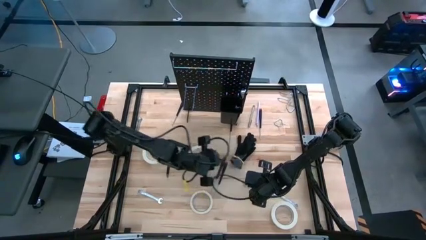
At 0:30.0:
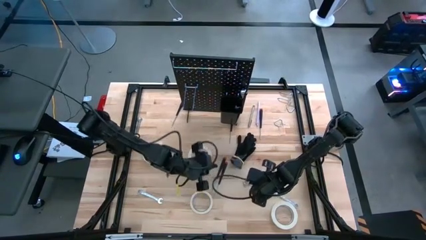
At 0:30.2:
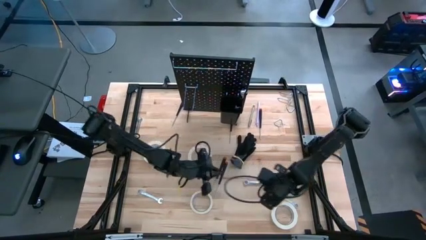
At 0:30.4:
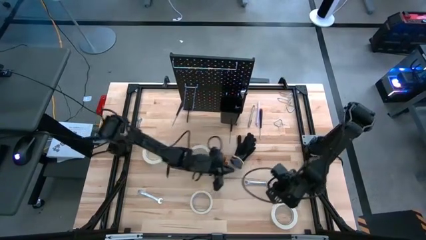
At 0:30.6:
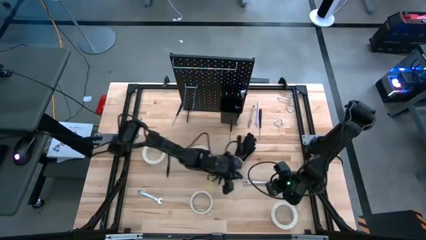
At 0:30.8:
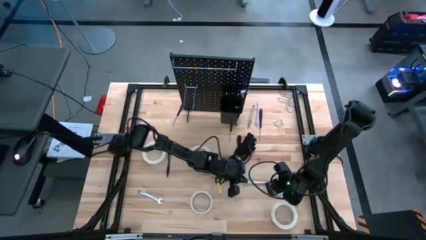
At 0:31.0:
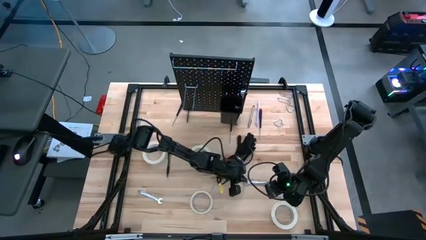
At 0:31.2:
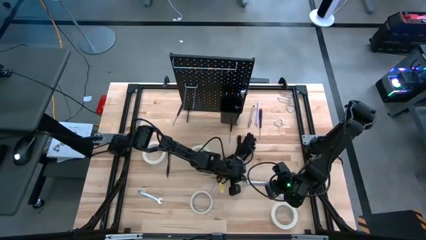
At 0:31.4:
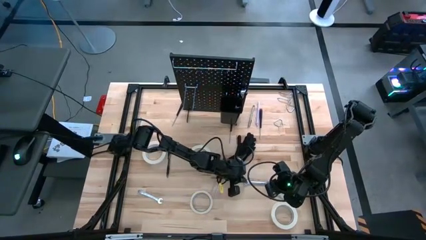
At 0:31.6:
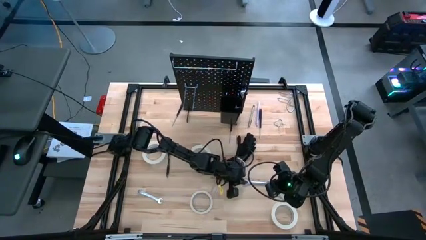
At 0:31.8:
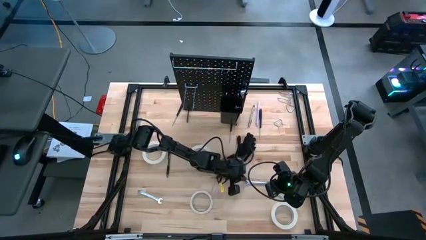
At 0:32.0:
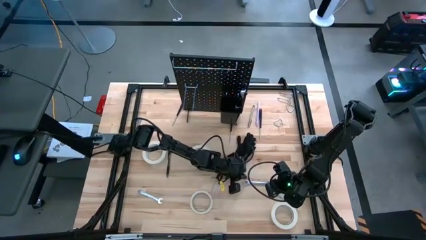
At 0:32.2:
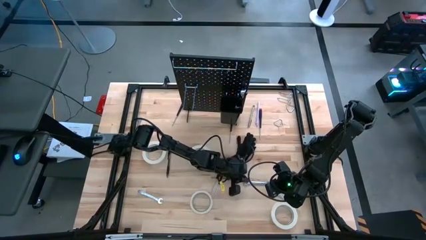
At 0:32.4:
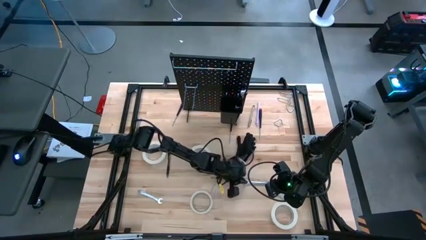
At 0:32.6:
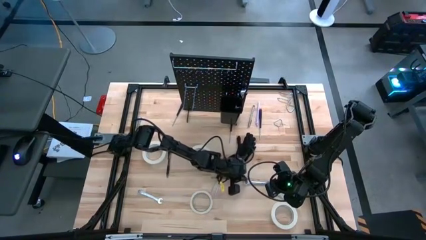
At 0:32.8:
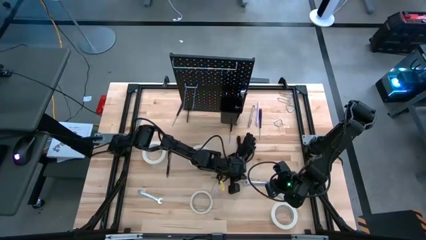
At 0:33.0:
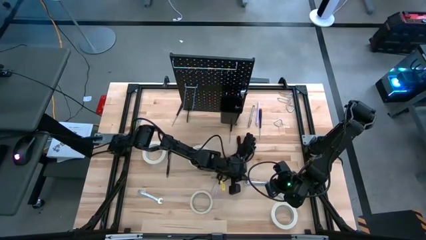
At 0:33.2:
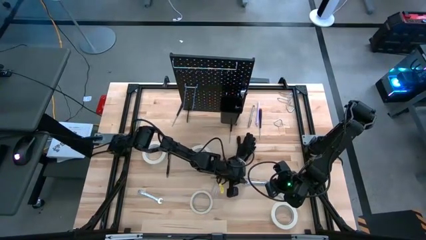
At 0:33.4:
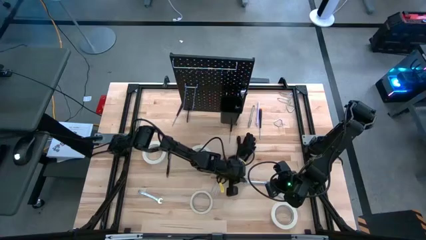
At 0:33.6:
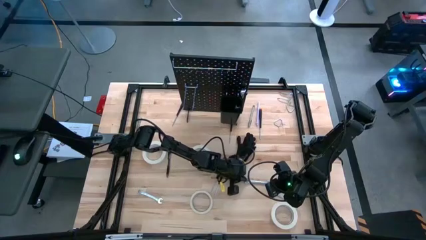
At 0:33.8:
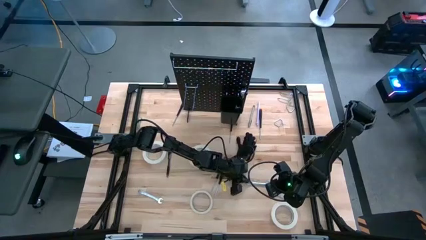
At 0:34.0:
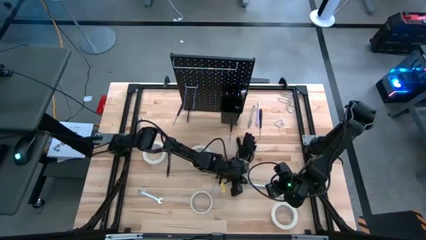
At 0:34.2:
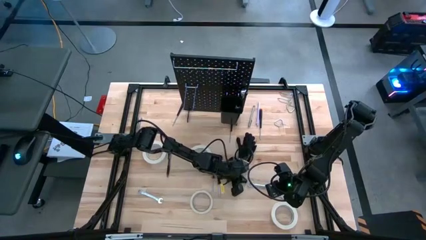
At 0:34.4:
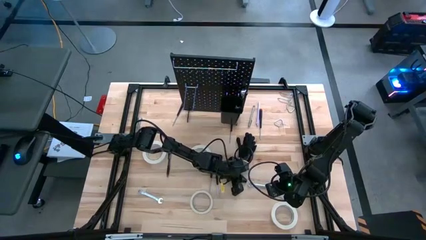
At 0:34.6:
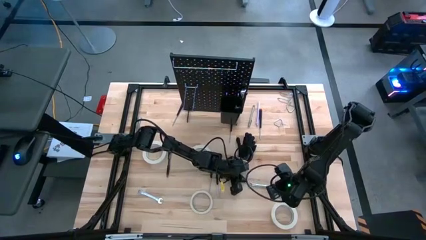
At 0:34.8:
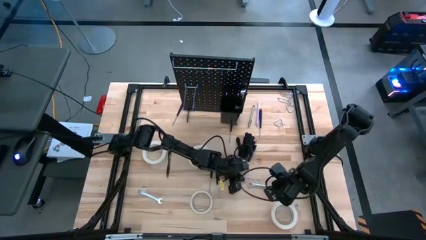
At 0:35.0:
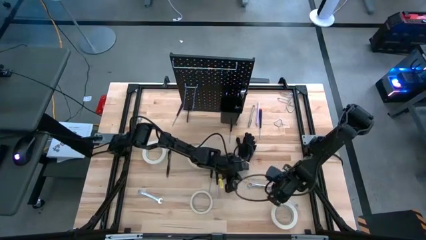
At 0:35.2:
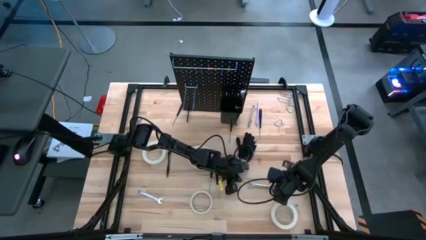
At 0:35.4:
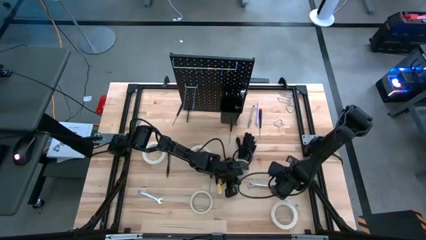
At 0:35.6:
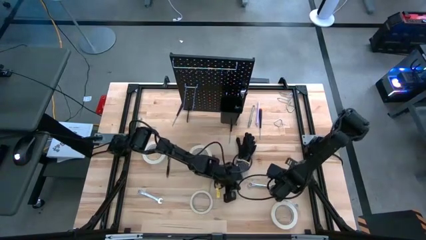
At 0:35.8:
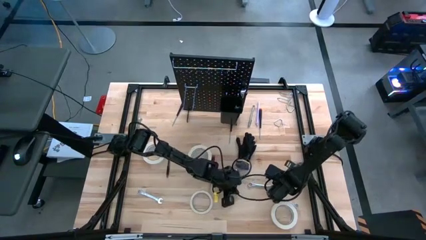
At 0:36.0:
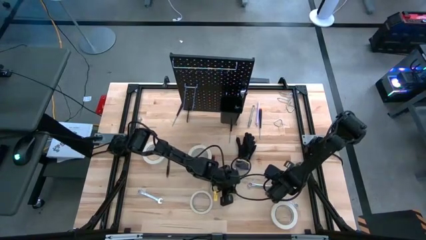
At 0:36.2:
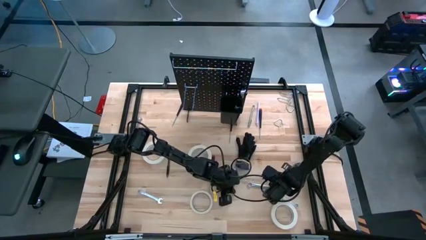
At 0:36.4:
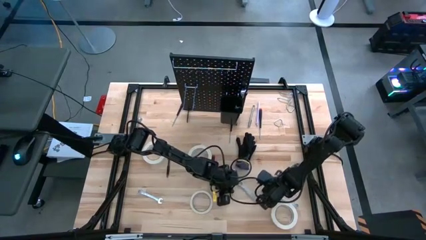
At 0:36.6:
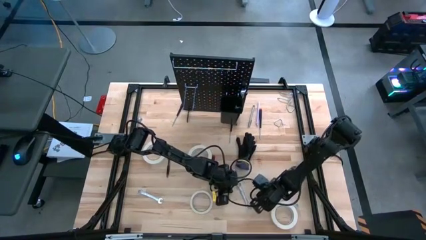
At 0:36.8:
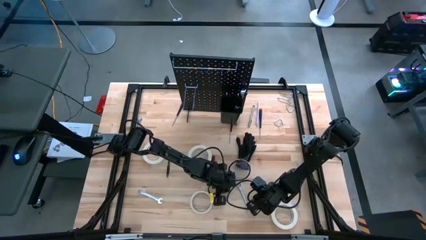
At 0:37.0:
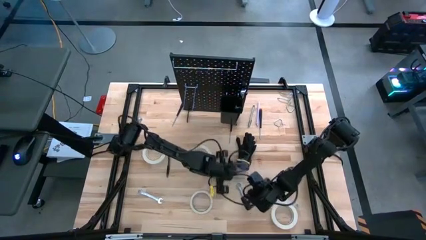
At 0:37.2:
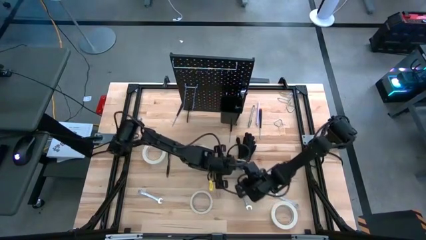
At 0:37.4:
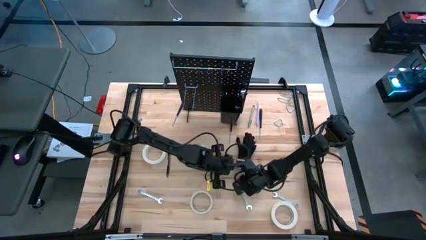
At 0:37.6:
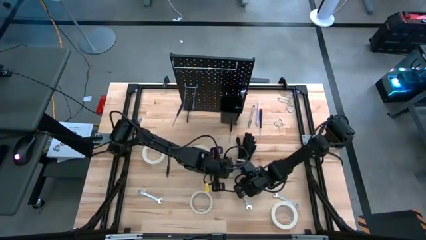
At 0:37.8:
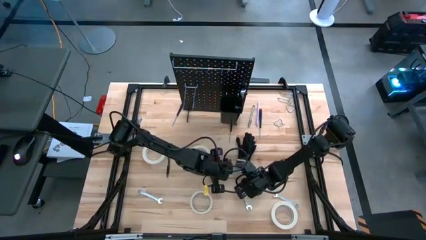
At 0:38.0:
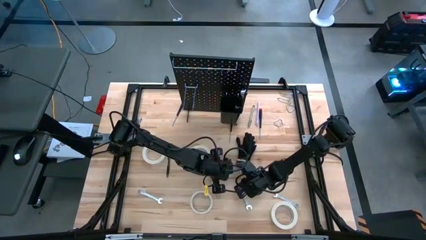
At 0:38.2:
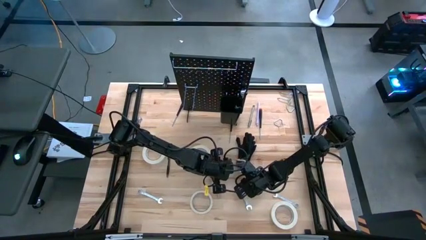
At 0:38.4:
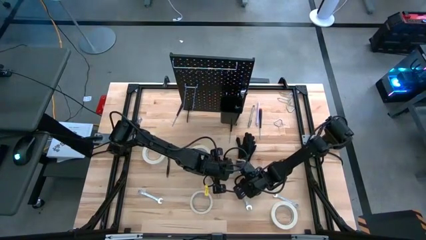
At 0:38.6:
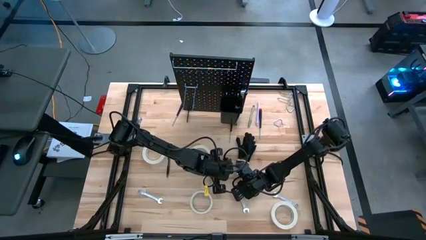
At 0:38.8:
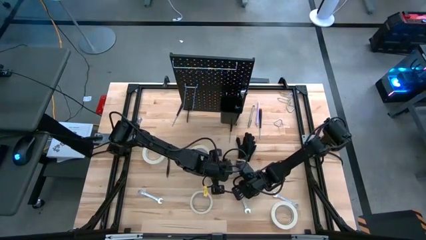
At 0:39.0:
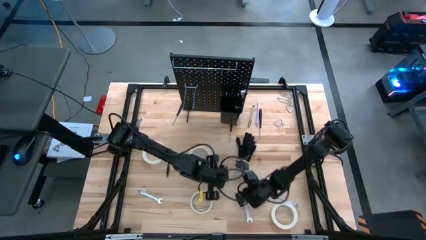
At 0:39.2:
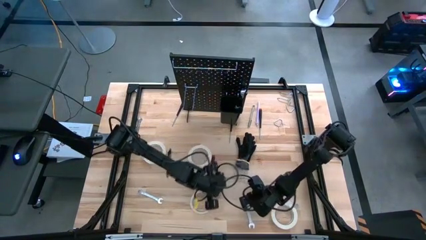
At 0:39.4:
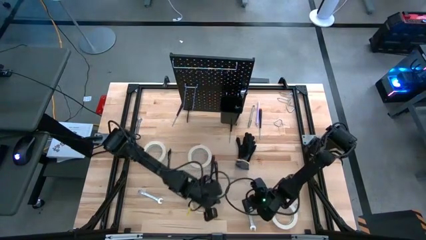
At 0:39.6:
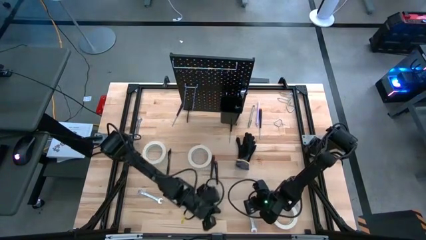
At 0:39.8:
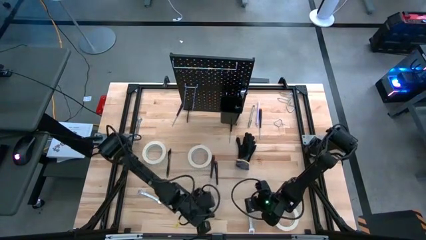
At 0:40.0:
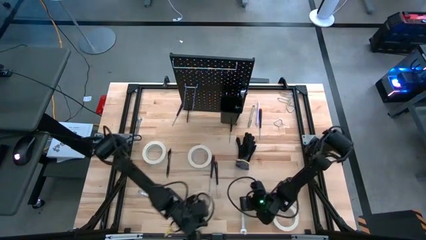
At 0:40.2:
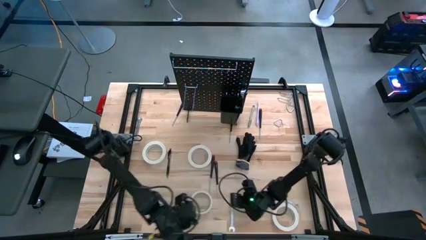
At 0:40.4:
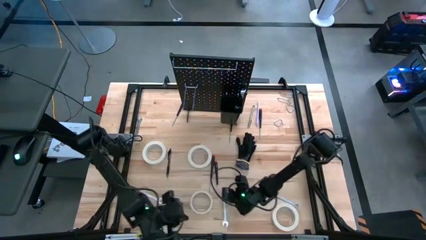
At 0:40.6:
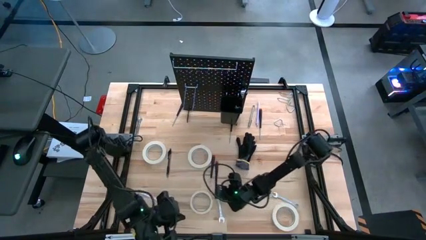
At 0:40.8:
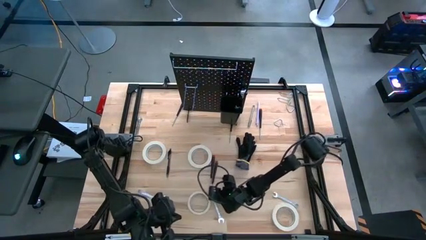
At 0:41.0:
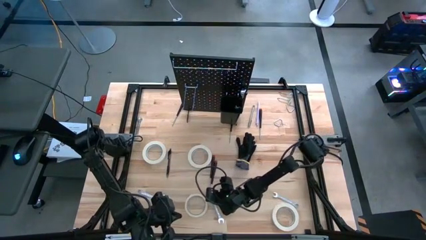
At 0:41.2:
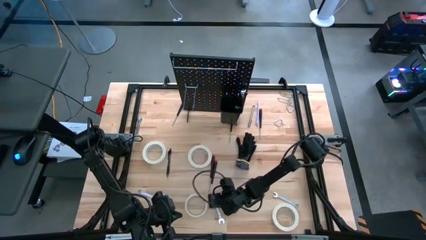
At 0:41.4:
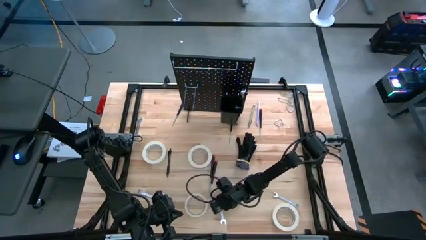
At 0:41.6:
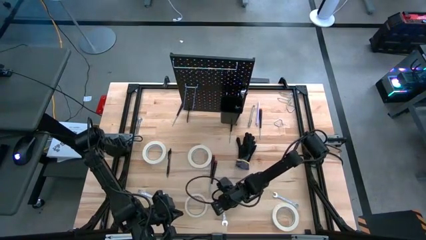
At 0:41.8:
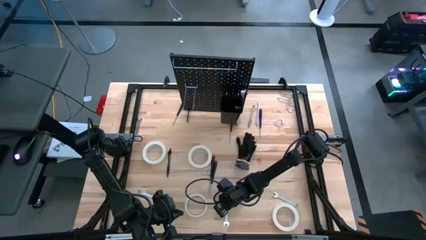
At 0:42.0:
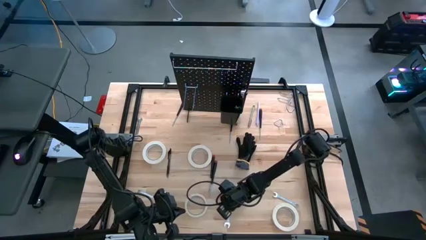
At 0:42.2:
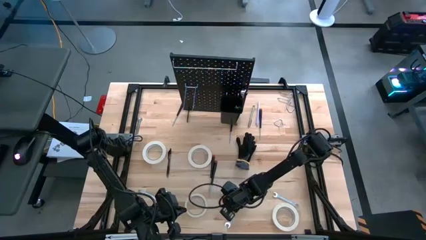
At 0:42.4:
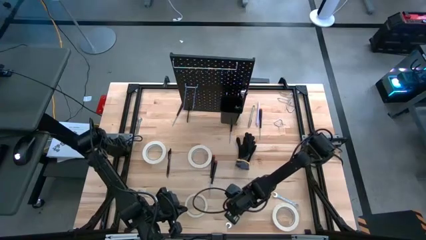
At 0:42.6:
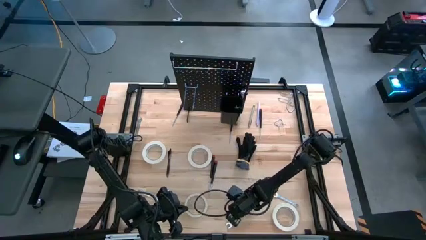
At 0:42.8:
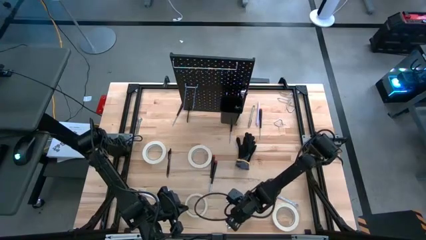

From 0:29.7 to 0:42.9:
Task: Hang tools onto peg board
Hang the 12 mm tool onto the pegboard on the top left
